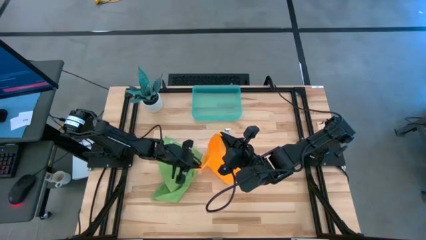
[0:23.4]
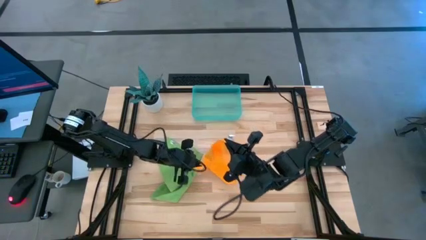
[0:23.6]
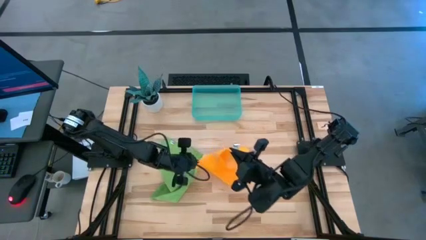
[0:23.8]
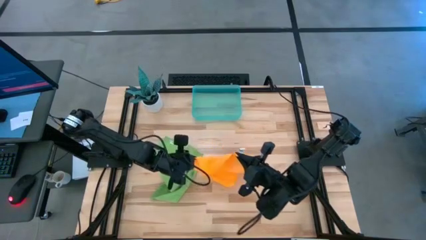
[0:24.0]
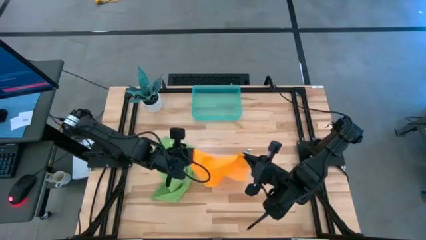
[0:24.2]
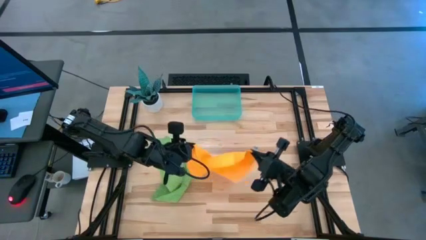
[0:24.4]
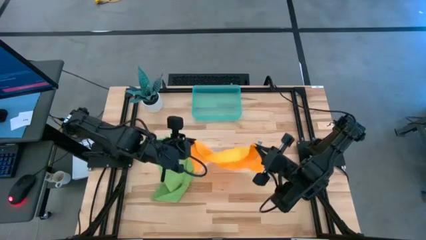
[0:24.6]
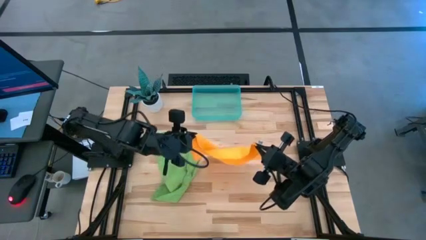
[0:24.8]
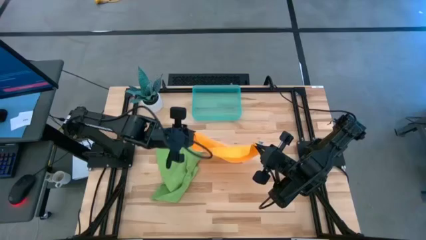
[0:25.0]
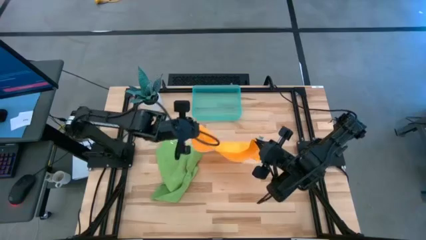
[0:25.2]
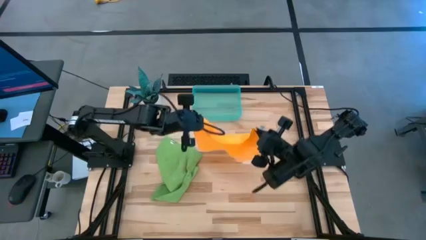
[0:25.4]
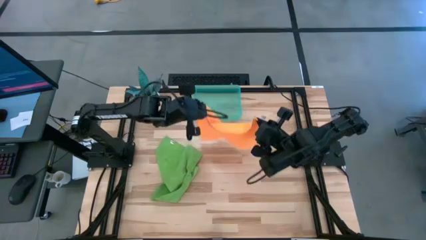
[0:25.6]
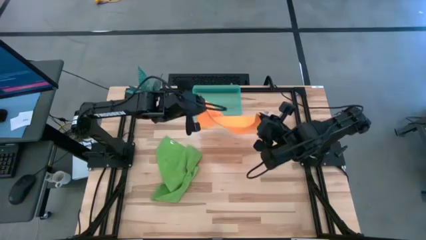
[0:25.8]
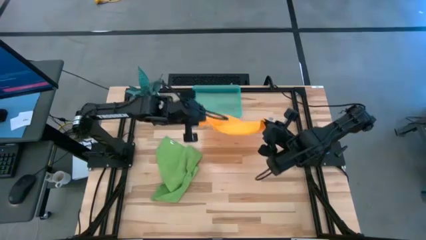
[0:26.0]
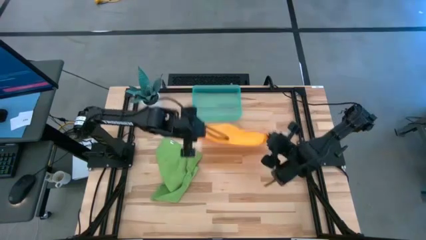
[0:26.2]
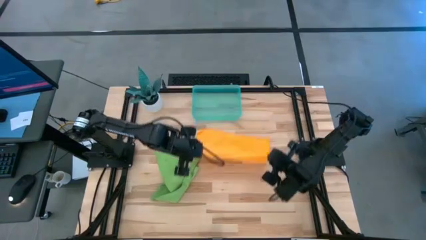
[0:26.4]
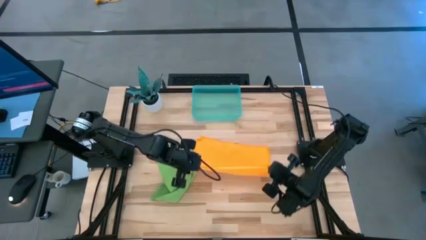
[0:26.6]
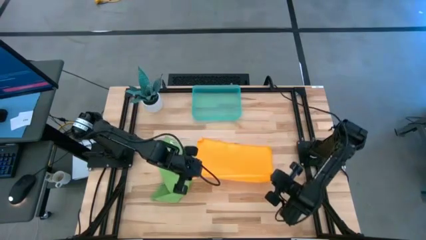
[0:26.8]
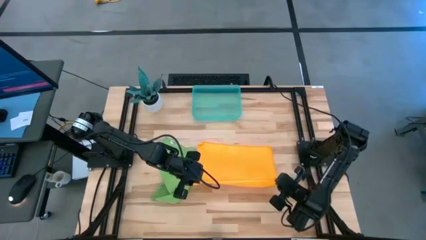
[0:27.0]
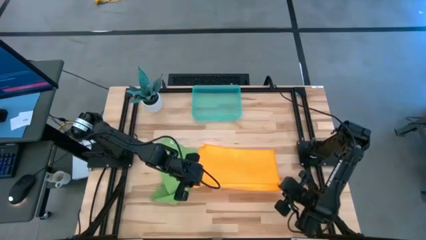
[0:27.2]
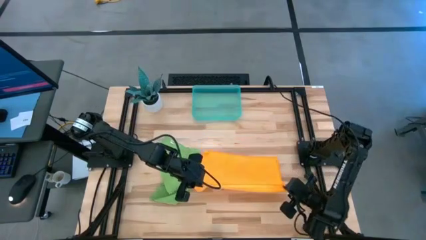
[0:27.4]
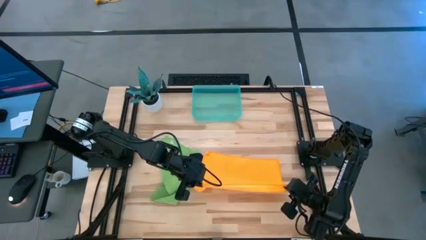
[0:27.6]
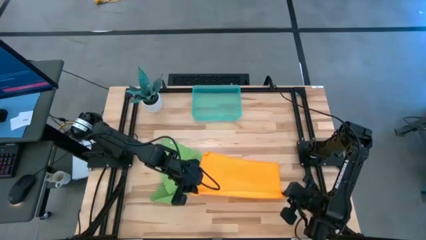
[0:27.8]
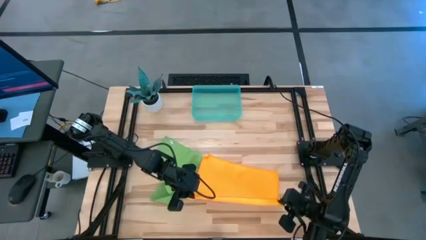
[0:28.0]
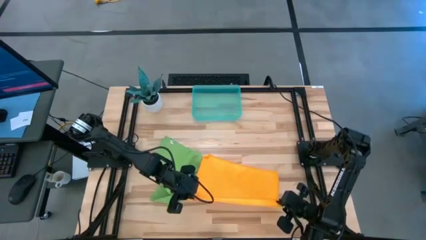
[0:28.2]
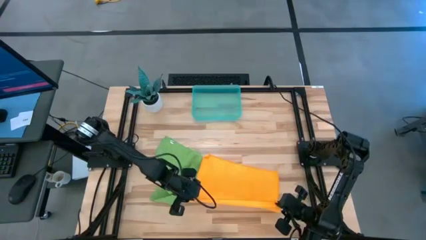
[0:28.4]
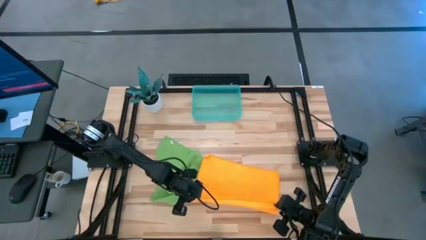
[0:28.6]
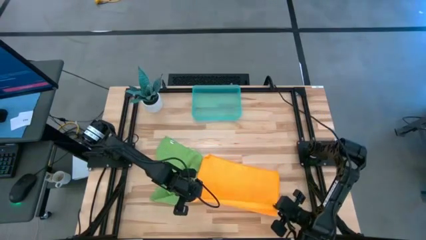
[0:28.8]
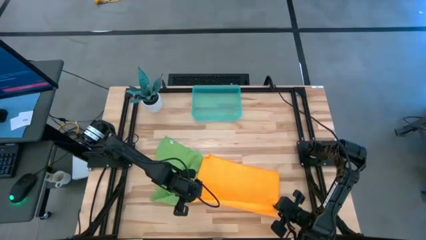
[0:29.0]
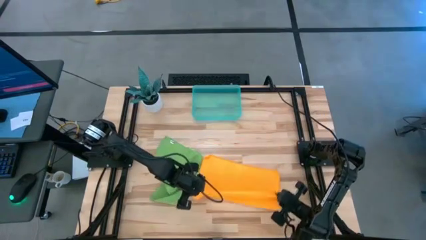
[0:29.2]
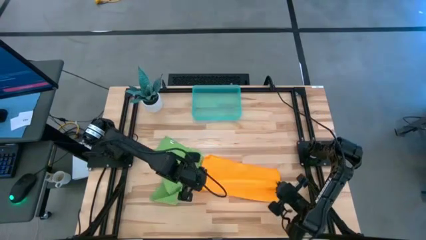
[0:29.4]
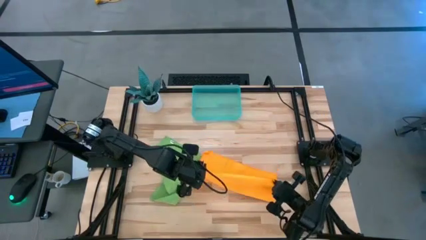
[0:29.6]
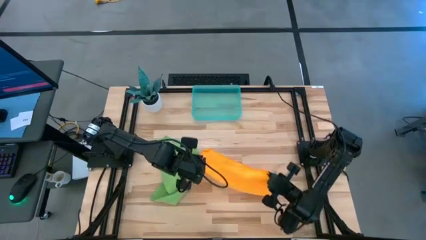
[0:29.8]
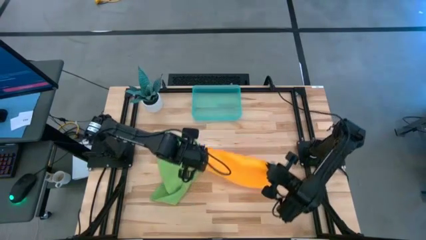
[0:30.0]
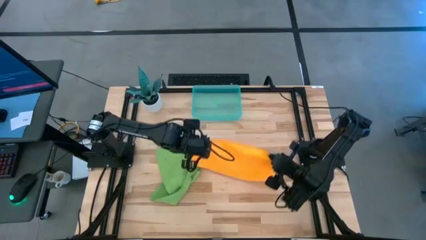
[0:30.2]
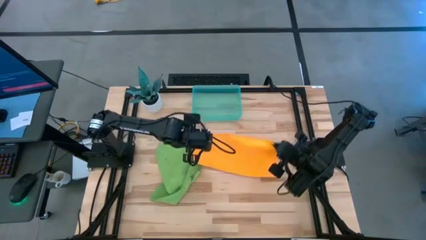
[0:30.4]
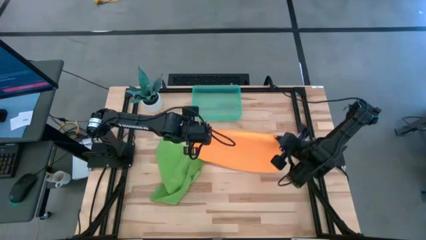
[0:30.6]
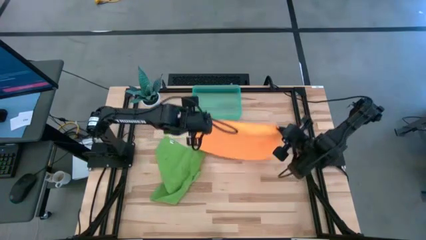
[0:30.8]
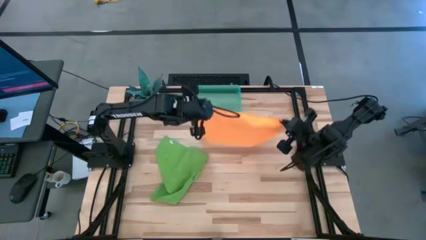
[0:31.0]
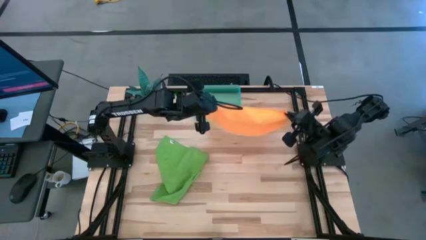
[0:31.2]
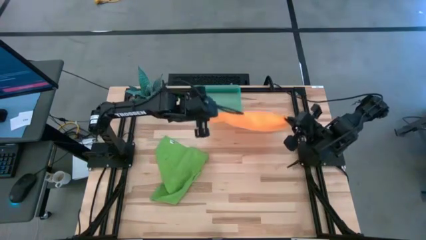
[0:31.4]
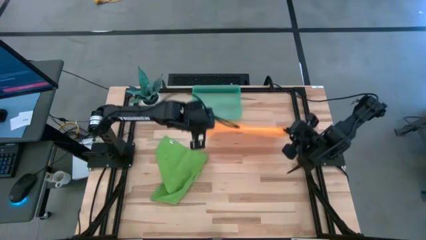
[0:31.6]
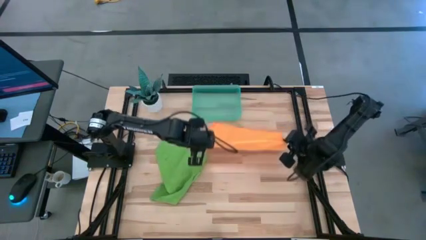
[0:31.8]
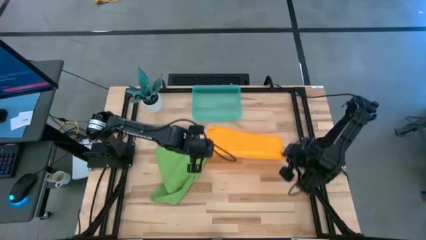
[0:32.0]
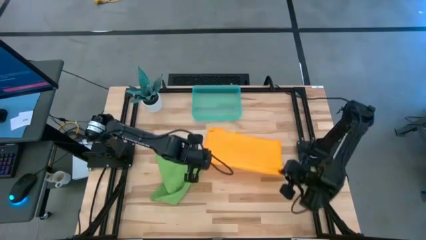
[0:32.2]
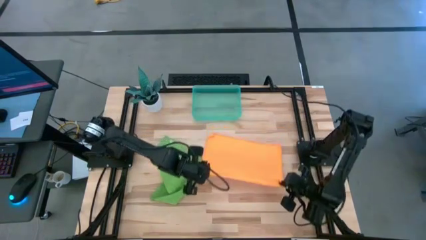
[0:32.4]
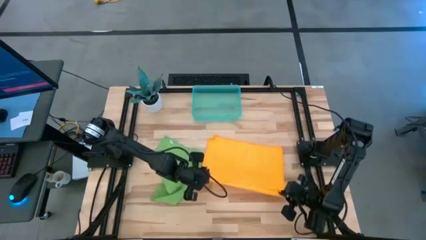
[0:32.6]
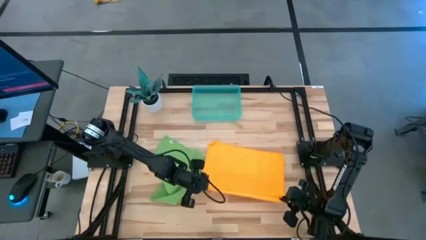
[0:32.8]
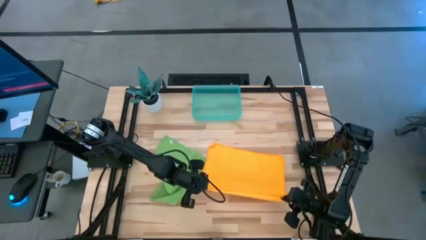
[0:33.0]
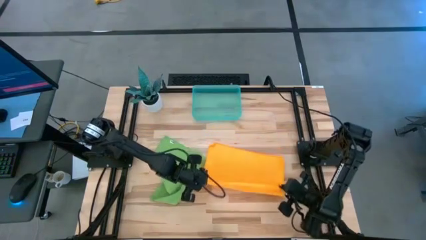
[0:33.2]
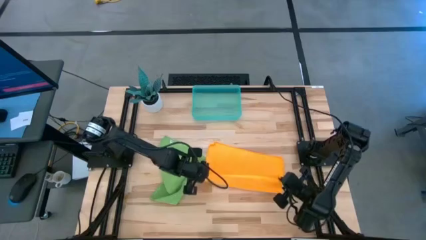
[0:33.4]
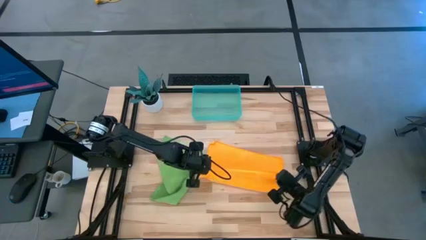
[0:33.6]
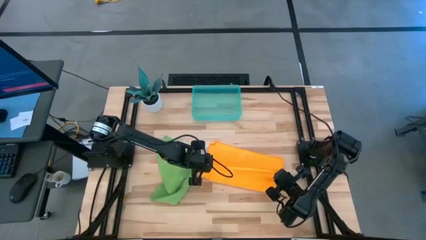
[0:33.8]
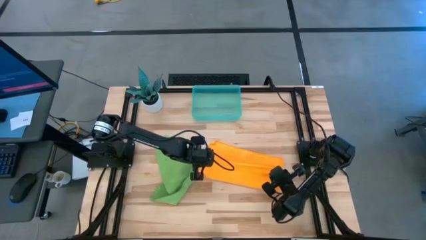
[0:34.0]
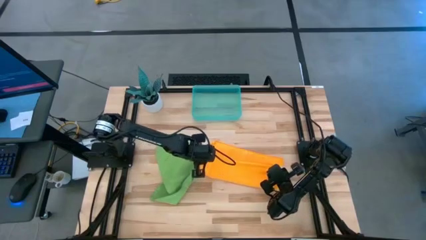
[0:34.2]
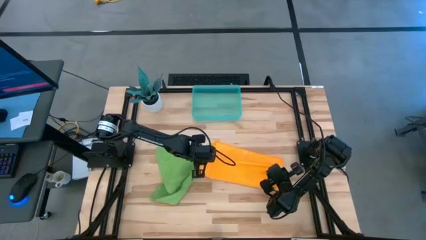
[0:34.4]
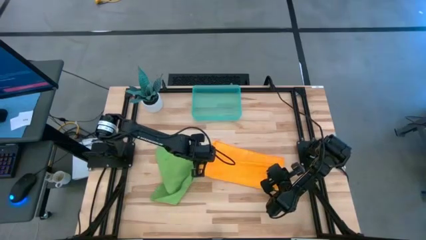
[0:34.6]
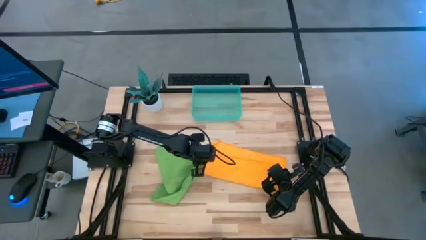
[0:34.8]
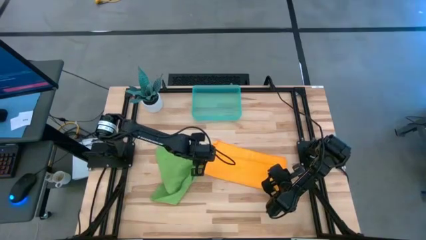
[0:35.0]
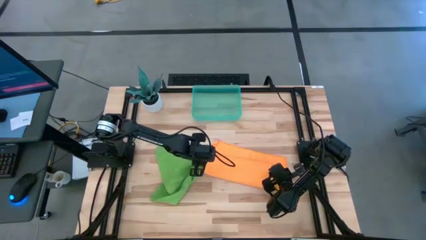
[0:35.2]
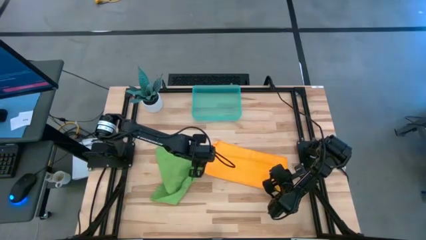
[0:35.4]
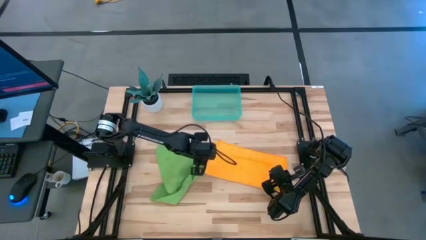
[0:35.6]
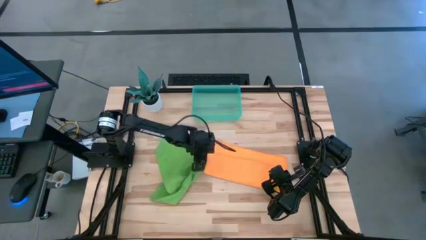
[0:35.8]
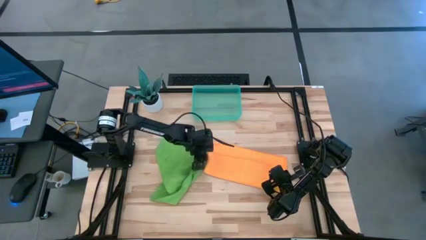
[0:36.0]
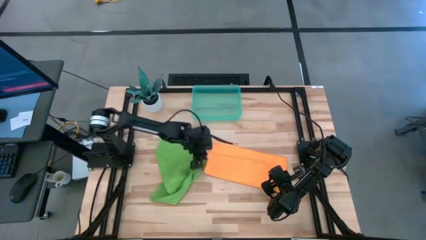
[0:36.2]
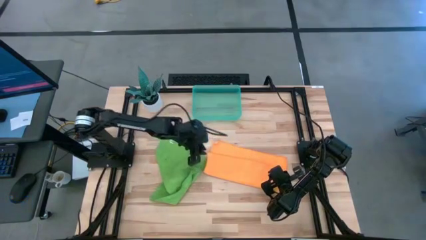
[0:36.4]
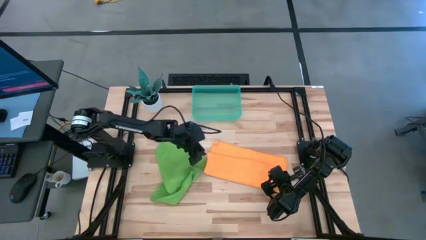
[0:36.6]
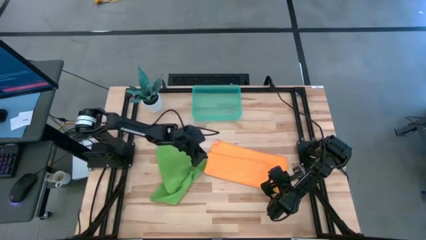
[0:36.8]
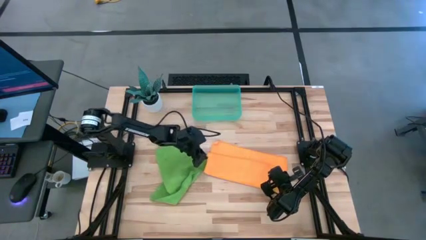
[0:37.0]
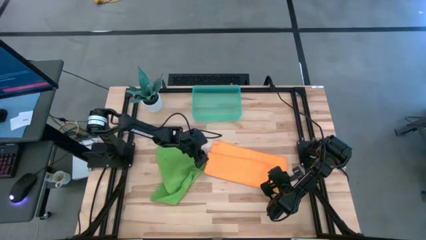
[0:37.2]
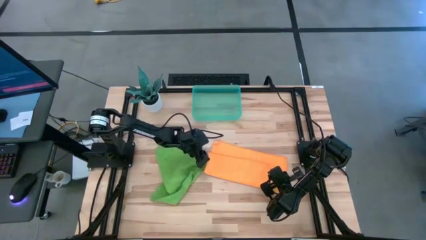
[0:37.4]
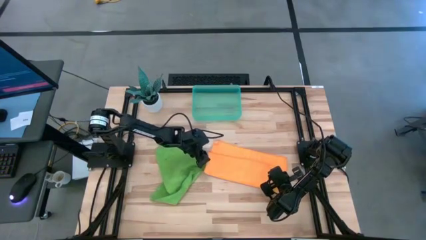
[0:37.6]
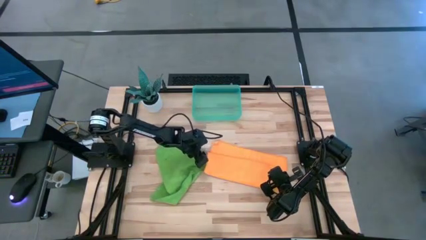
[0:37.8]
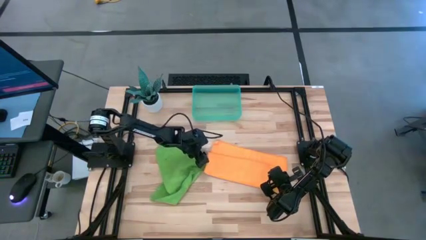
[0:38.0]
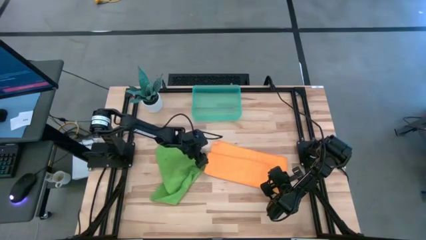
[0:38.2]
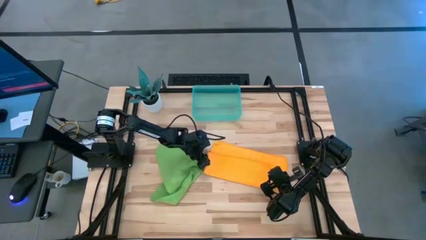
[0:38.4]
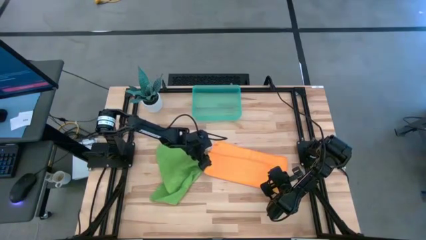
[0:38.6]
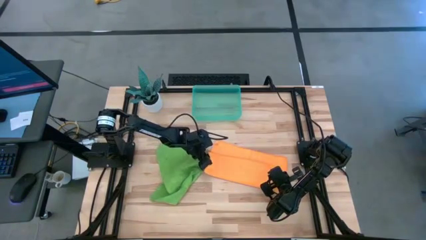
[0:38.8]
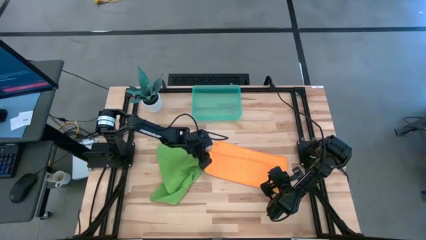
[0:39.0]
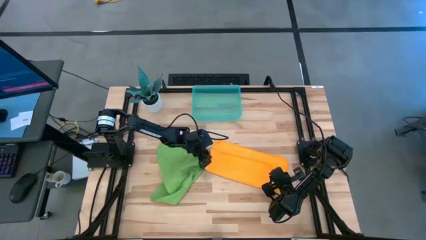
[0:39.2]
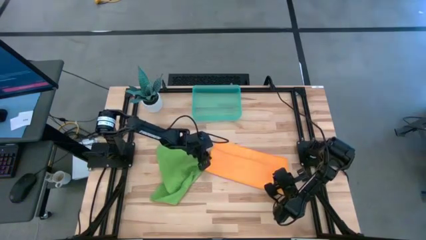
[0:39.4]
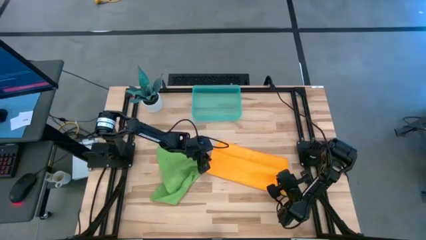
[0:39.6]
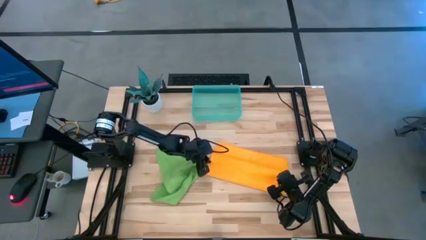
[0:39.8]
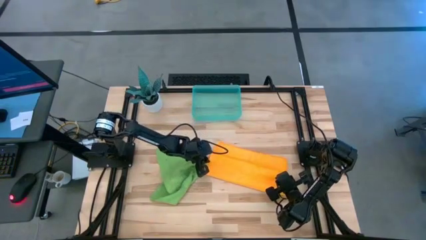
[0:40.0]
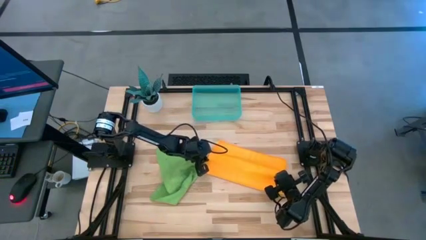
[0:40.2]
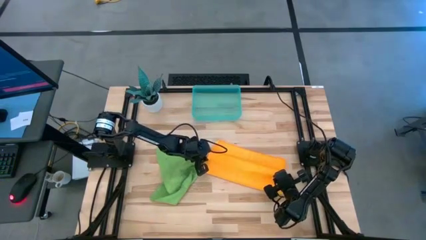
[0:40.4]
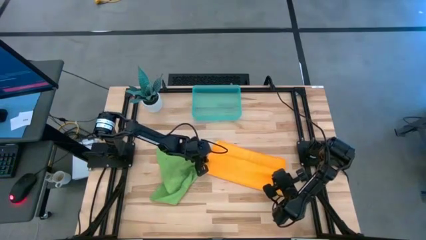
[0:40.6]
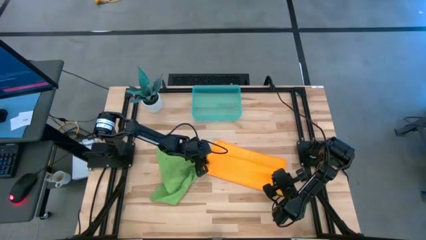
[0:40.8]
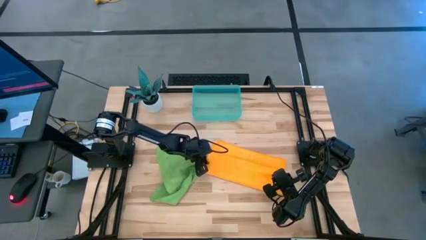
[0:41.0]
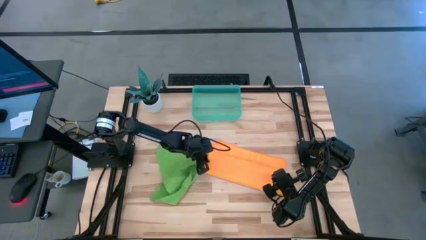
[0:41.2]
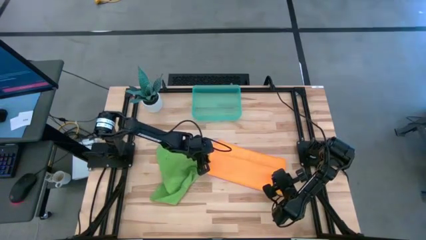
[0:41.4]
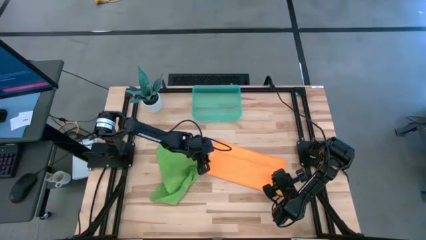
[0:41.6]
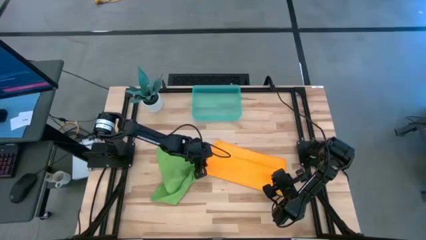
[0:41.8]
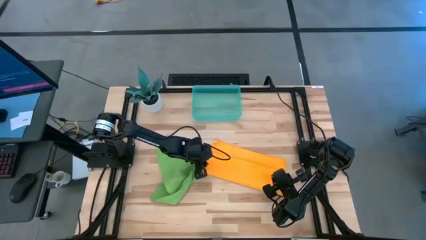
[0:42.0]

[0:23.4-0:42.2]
Task: Roll microfiber towels into tight, uniform cylinder then place into a basket
Roll the orange microfiber cloth
